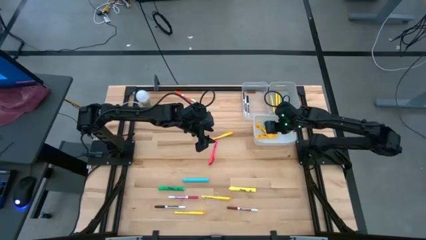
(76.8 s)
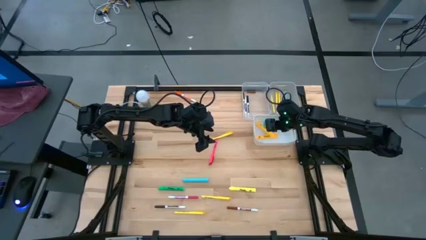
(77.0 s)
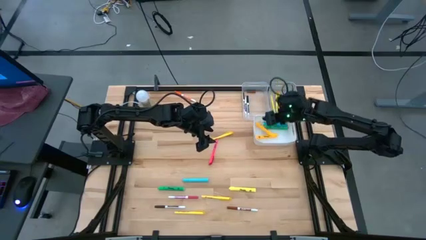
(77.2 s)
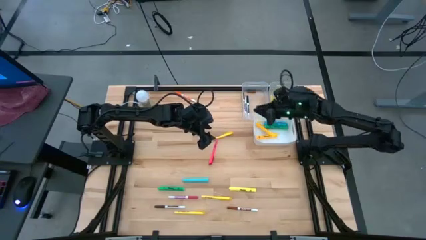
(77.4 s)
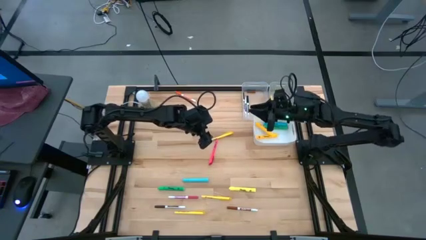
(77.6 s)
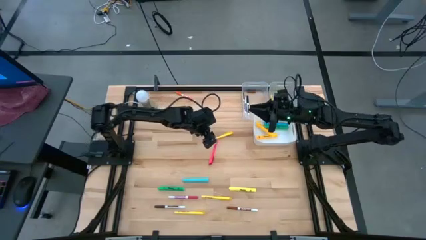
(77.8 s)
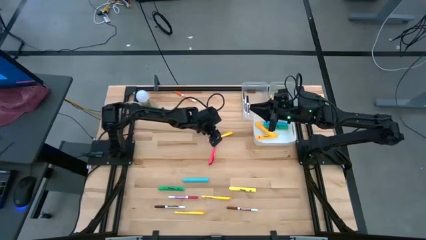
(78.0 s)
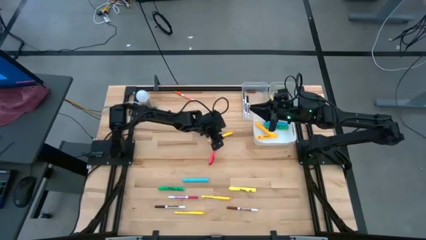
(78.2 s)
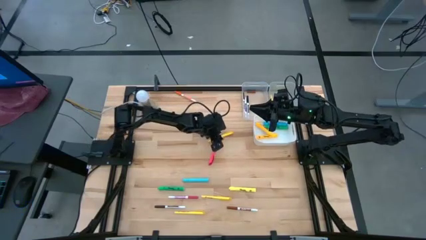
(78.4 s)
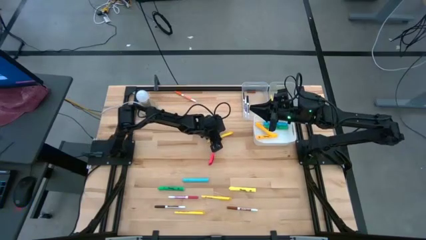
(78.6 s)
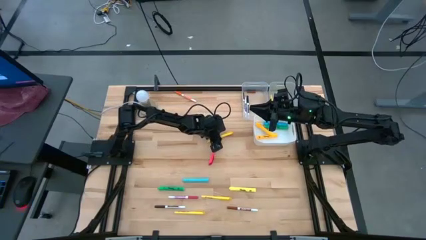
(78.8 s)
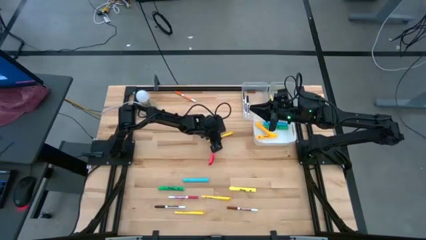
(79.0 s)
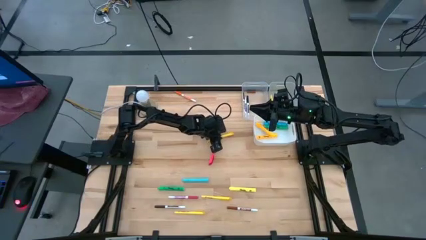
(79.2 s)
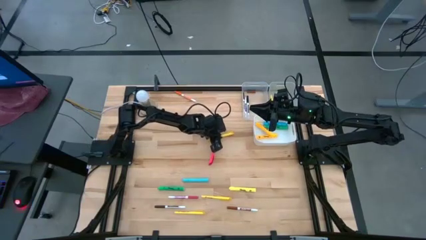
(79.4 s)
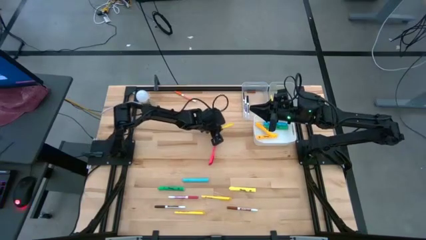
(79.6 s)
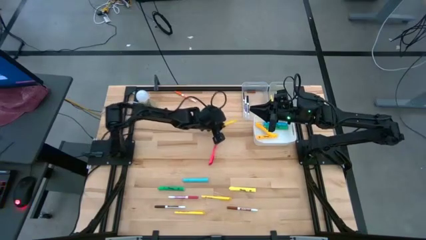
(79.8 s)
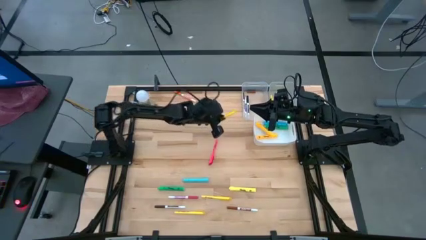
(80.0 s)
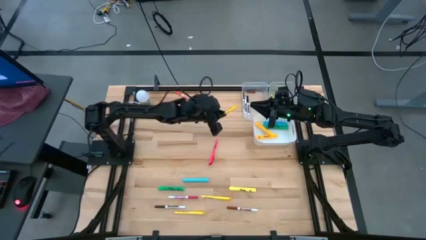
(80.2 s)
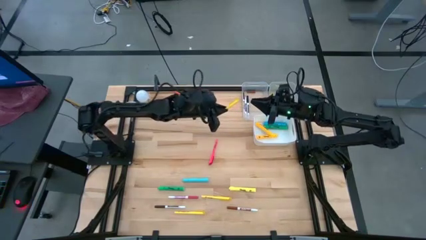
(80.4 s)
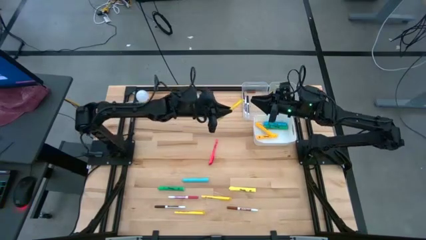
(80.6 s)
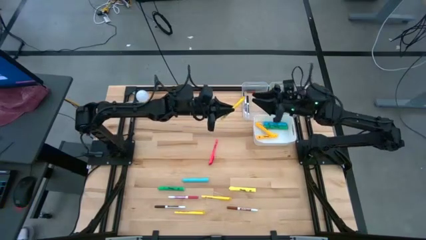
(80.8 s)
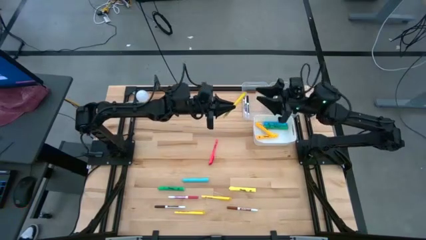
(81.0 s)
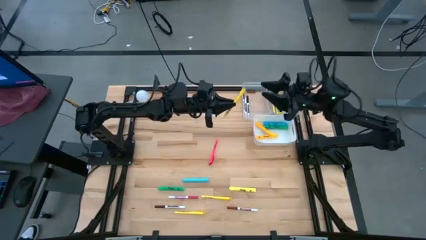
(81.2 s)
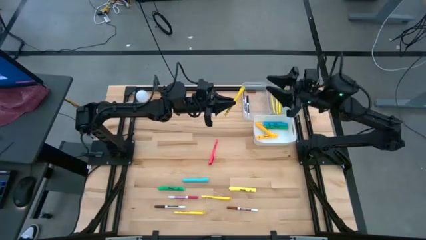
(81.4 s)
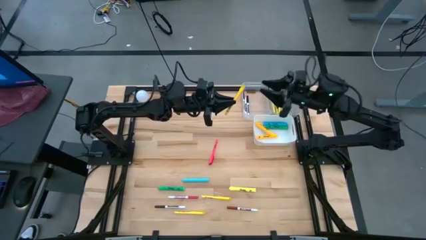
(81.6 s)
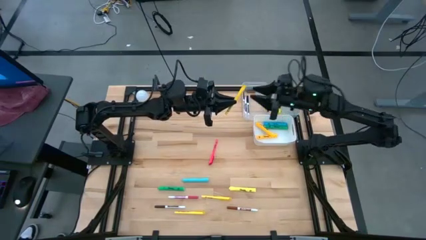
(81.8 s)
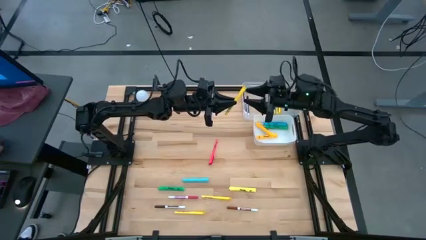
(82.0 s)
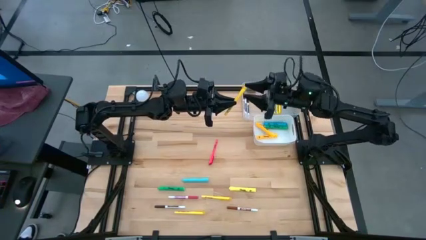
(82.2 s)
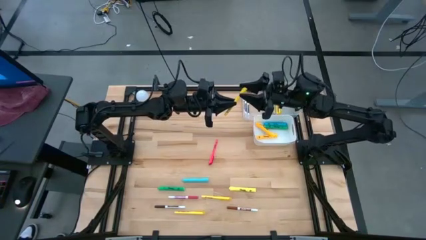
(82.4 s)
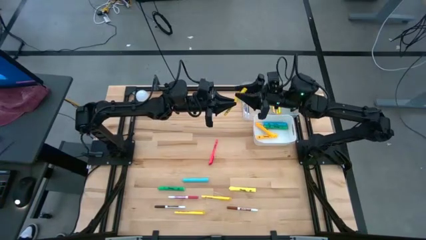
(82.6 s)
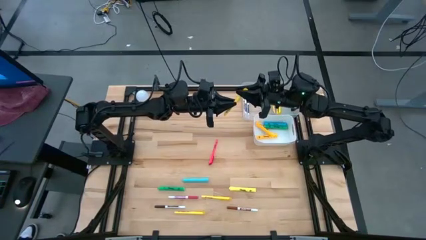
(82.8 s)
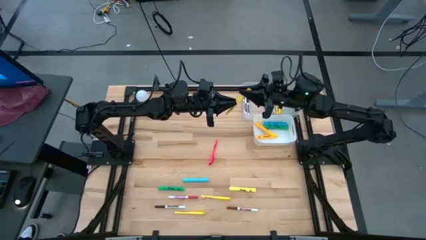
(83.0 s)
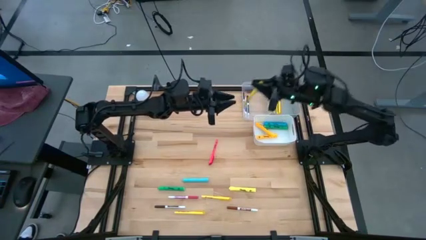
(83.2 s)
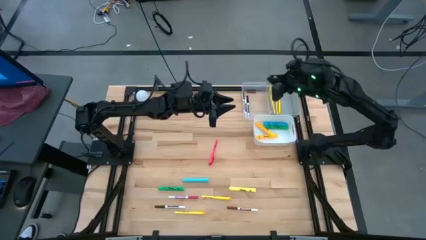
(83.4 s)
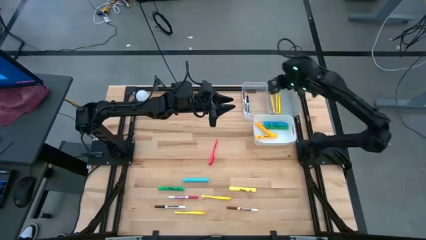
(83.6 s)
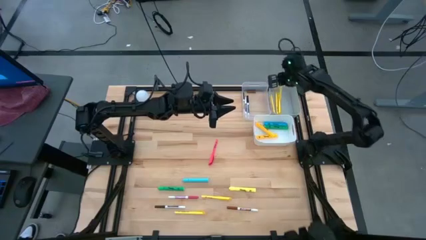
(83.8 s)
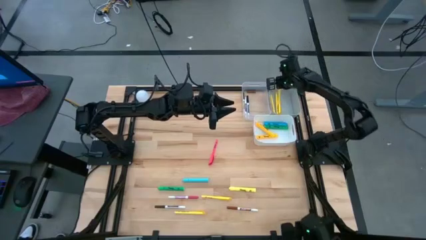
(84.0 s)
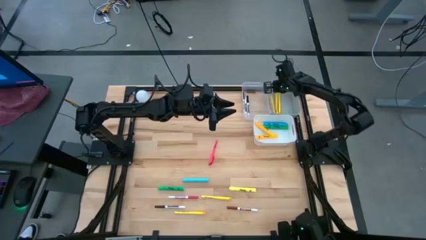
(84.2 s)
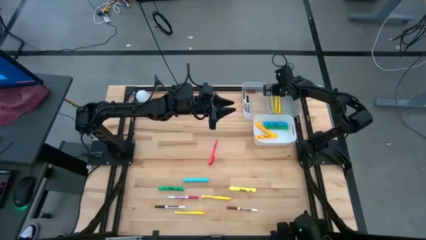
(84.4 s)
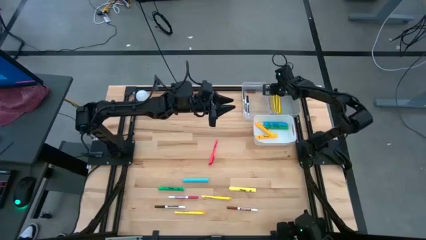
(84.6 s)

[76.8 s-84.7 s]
Task: Pick & Place Markers
Put the yellow pen into the gray bin

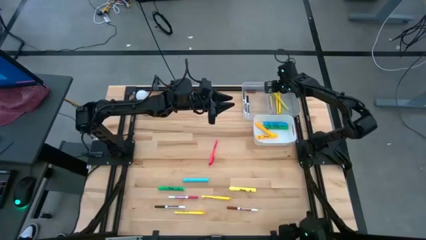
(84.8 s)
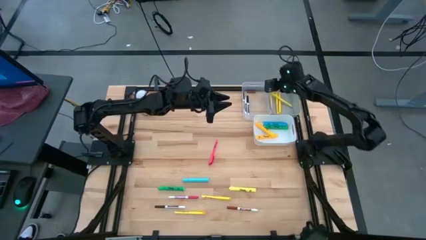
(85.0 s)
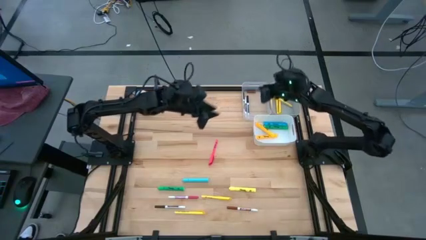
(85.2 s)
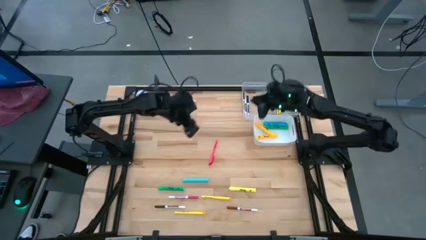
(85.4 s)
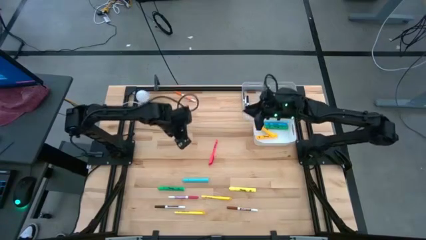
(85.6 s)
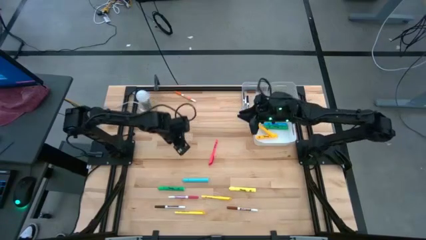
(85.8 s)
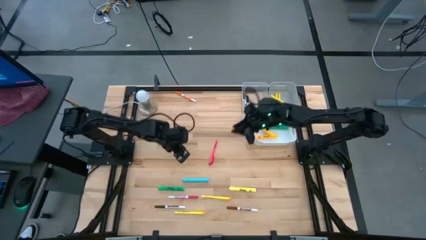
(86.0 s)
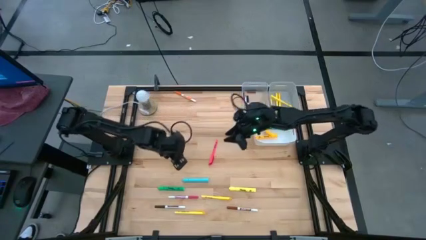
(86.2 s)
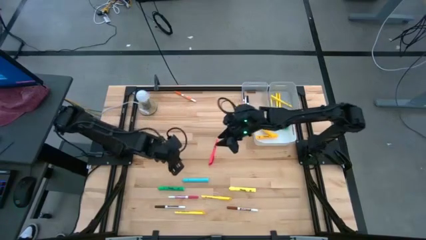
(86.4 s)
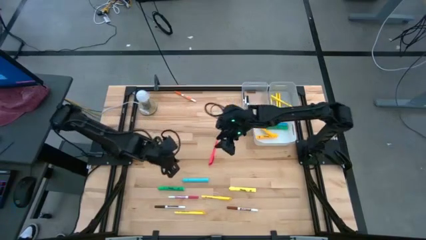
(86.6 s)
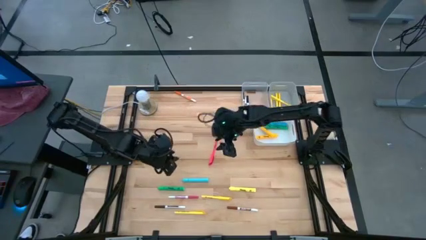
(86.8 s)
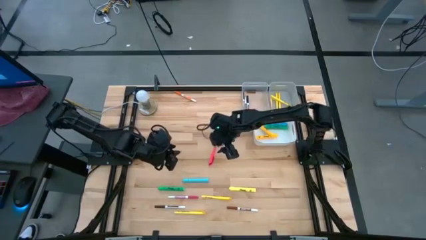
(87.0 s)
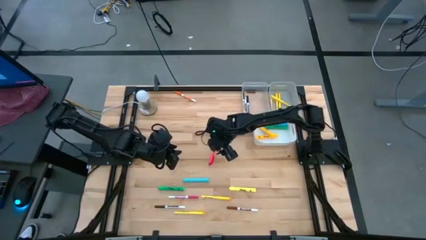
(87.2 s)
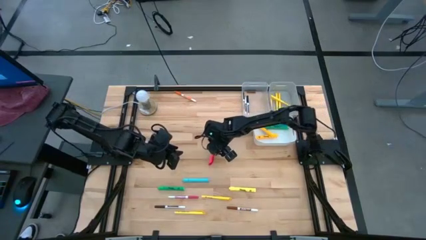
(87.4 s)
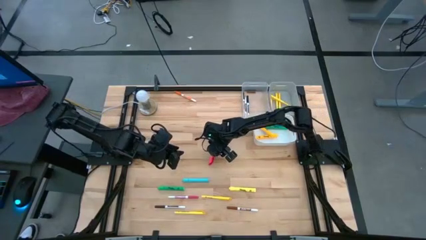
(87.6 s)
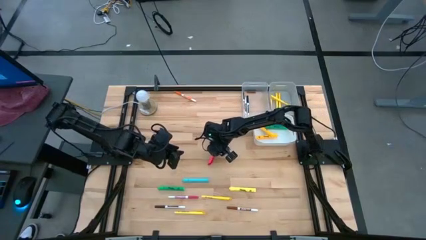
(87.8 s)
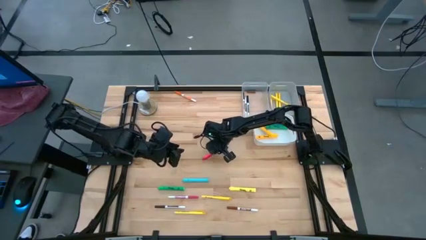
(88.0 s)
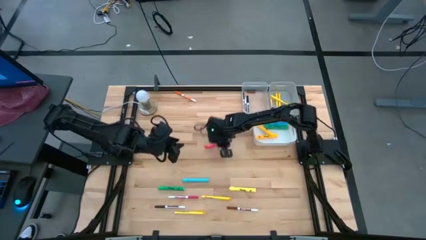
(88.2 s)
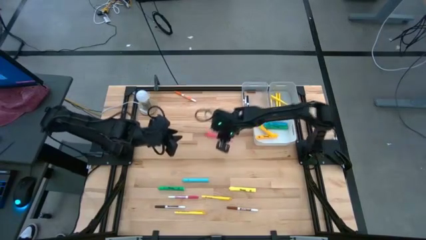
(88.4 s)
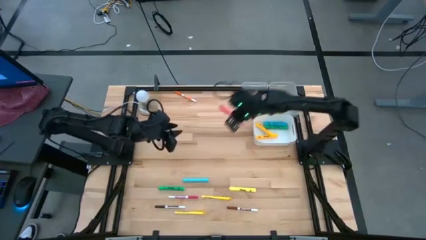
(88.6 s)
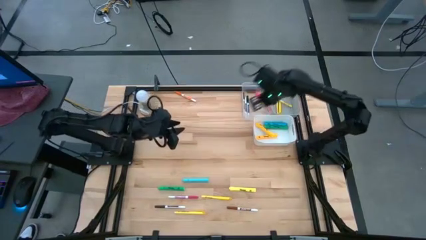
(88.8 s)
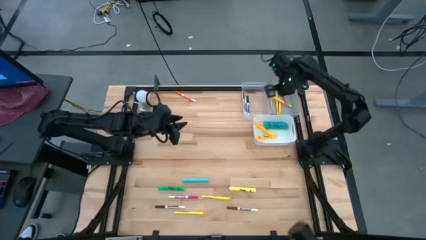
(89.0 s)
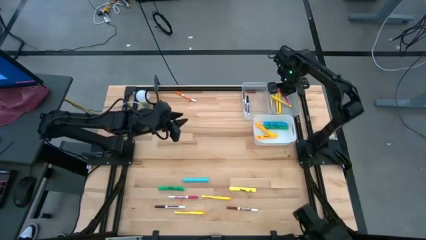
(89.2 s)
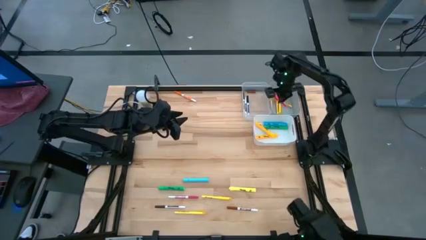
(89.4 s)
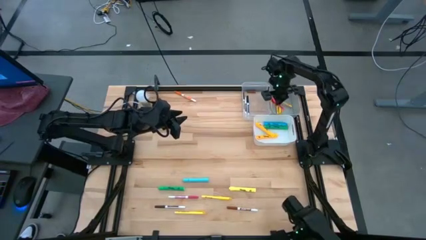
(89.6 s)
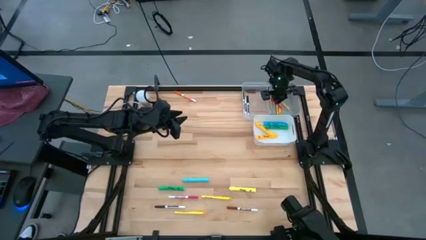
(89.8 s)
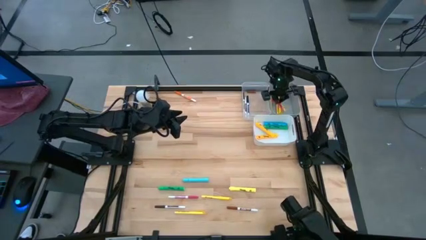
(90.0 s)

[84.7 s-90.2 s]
Put the pink pen into the gray bin

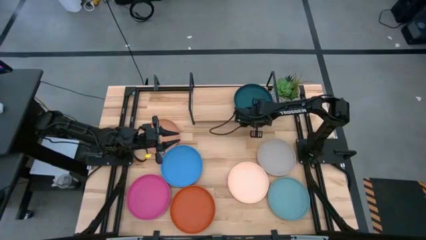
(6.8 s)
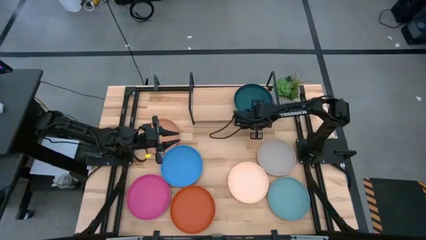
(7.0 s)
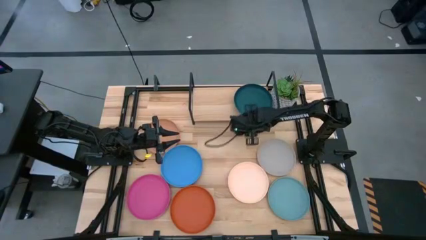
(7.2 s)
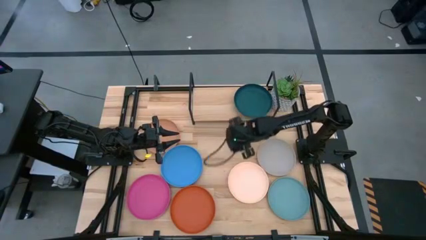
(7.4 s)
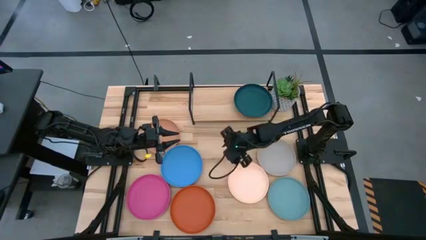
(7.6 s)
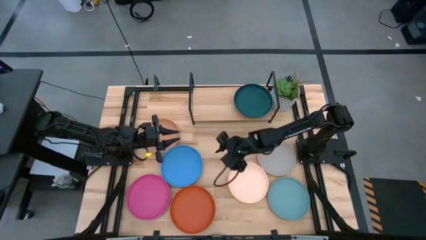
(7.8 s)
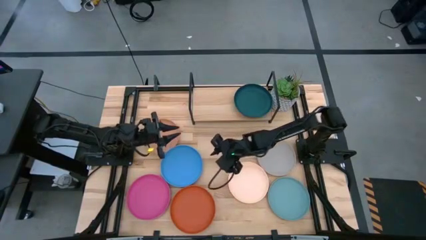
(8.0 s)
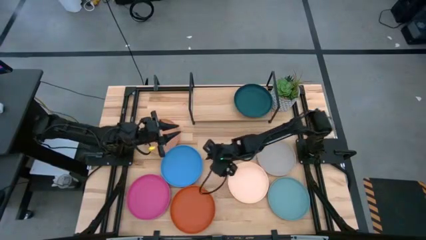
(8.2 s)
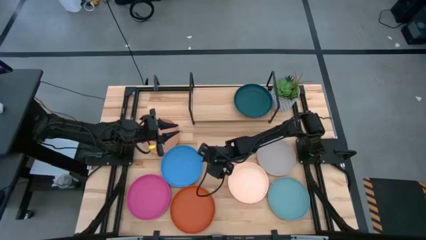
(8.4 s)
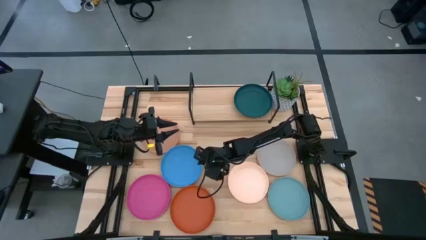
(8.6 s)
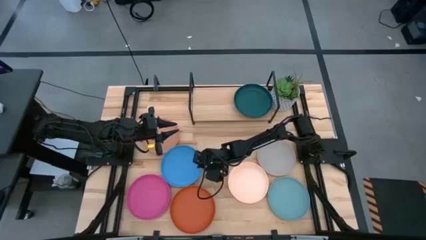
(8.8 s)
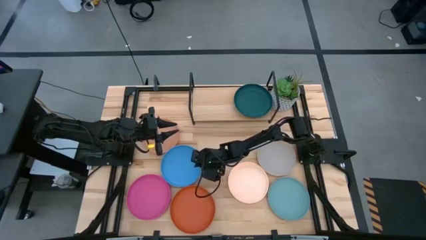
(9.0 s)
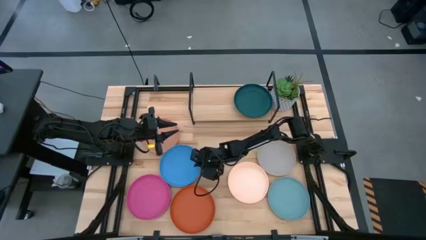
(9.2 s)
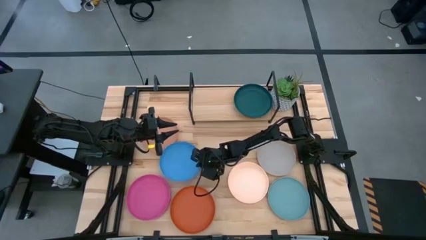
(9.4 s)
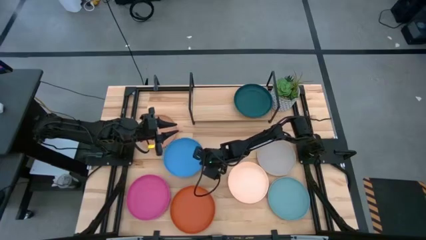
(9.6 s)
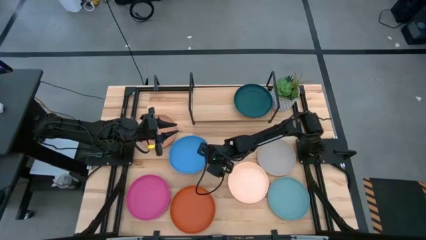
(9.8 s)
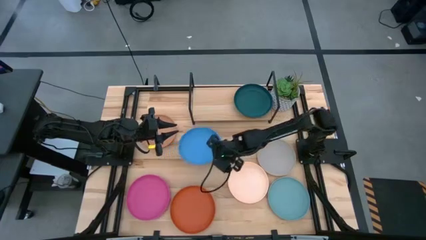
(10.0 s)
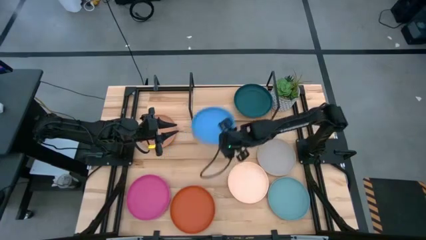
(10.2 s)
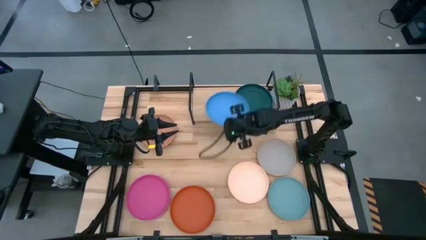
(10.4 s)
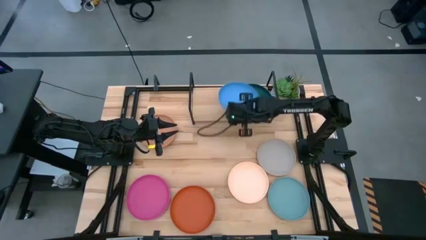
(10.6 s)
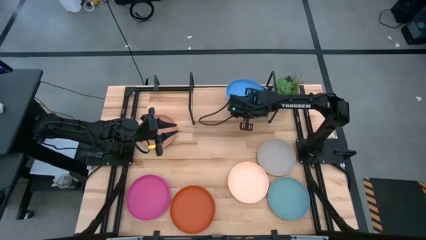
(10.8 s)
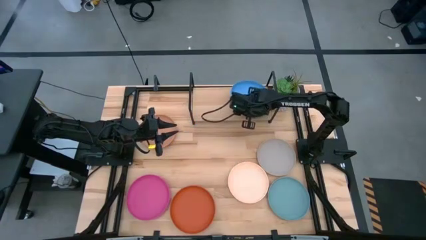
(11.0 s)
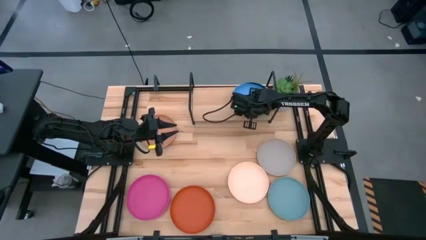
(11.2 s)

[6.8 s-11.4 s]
Task: Place and stack plates onto a shelf
Stack the blue plate on top of the dark blue plate on the shelf
